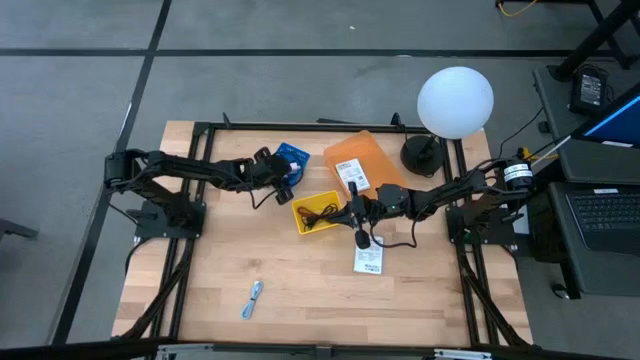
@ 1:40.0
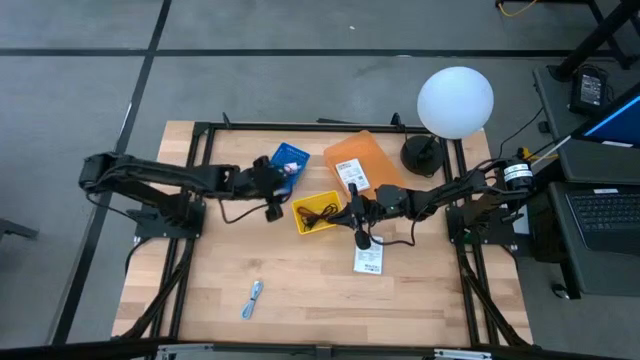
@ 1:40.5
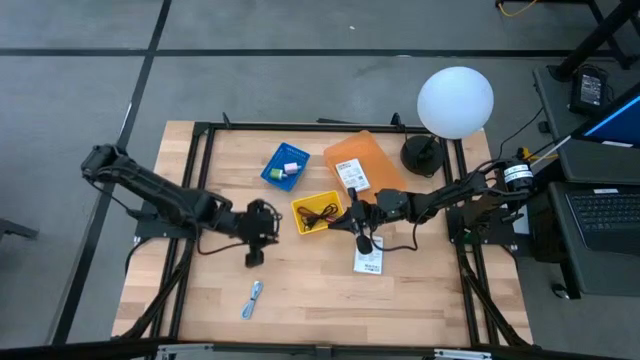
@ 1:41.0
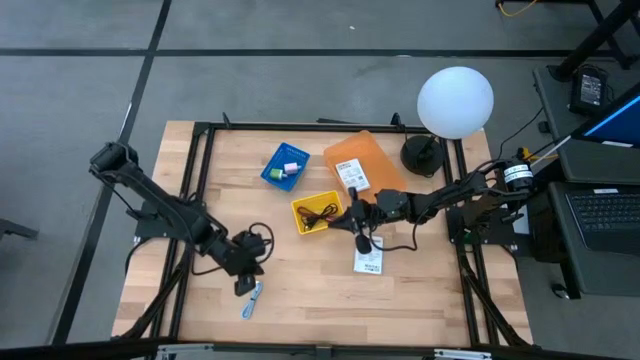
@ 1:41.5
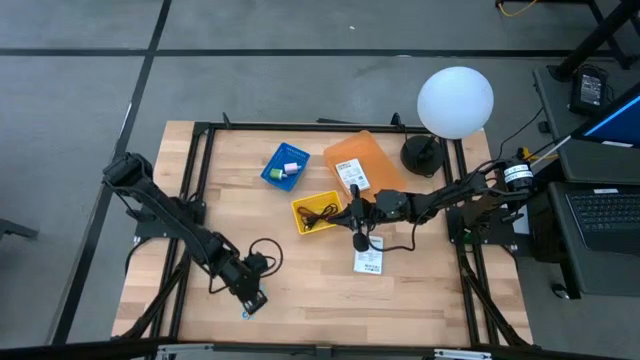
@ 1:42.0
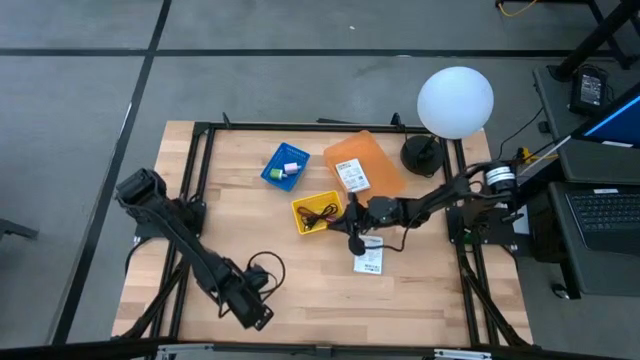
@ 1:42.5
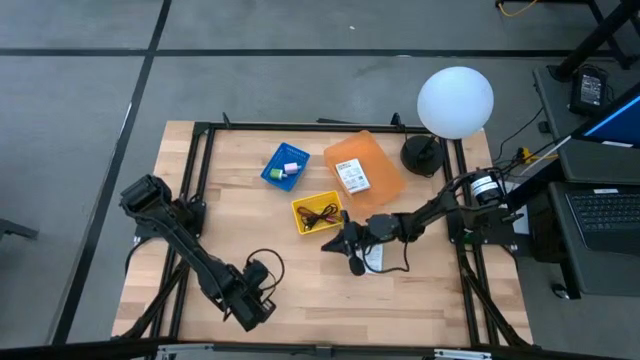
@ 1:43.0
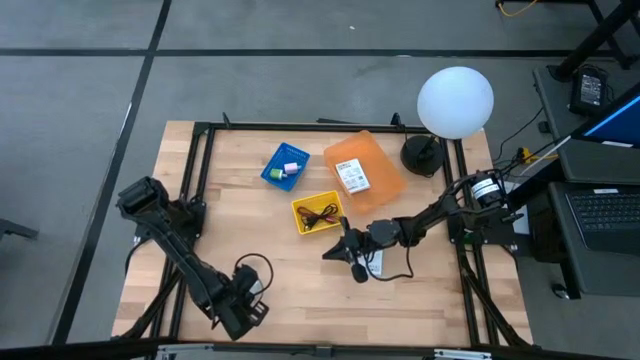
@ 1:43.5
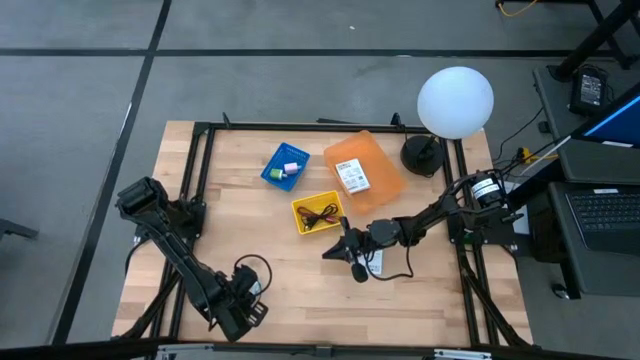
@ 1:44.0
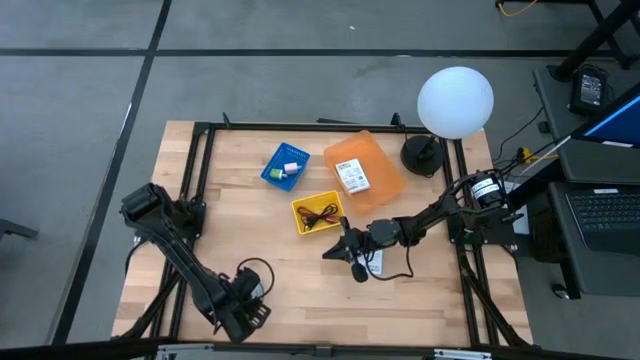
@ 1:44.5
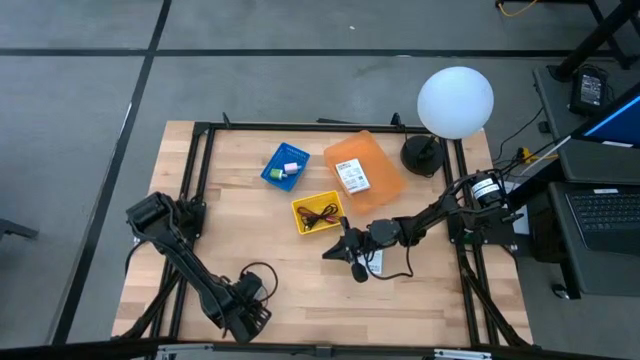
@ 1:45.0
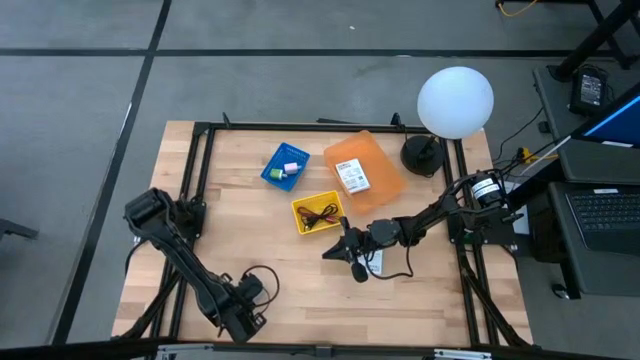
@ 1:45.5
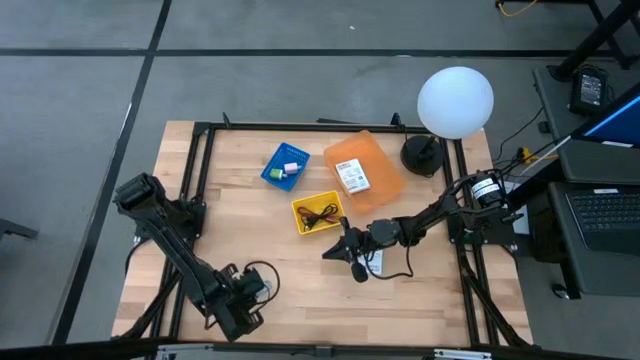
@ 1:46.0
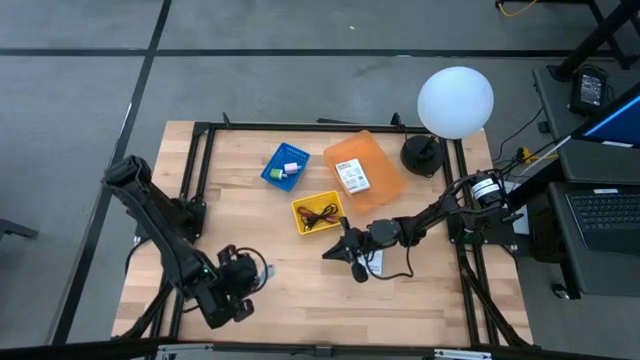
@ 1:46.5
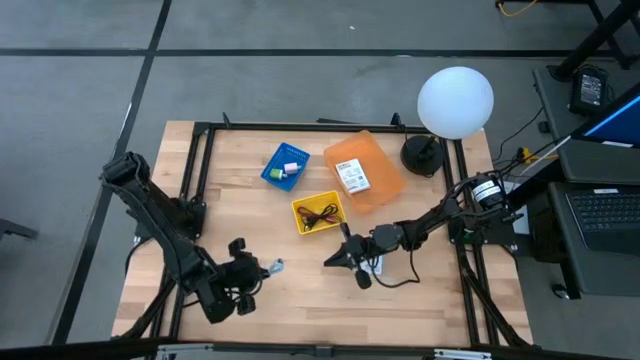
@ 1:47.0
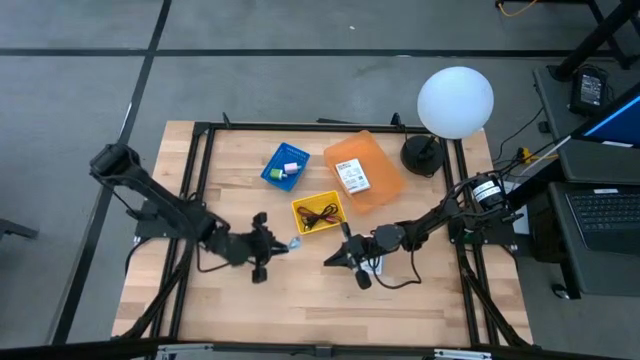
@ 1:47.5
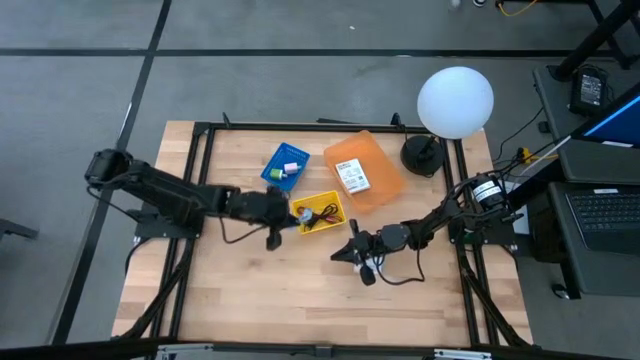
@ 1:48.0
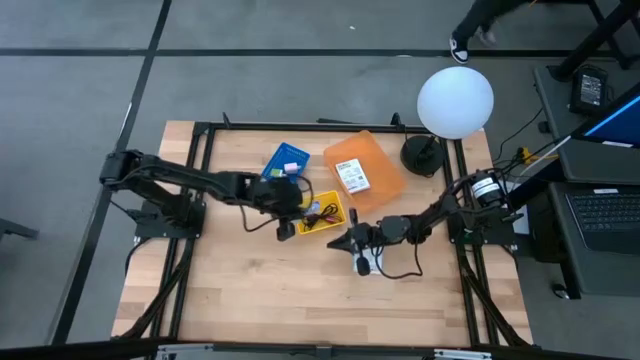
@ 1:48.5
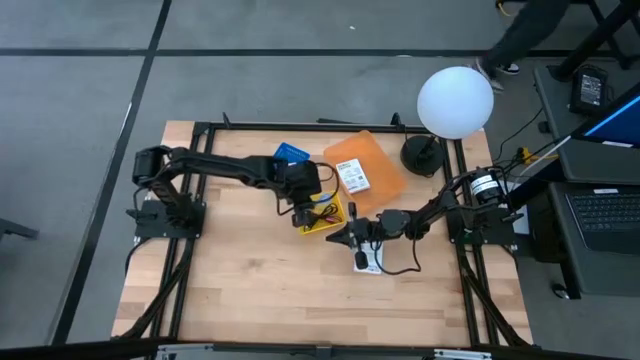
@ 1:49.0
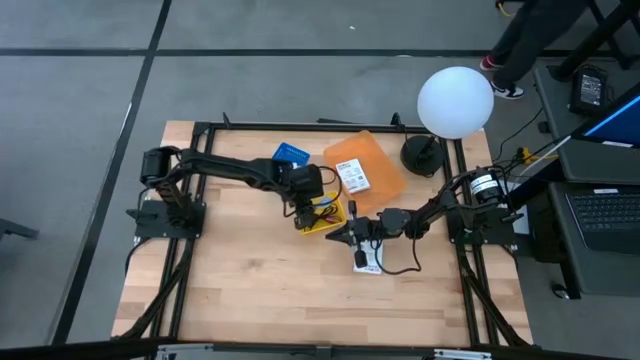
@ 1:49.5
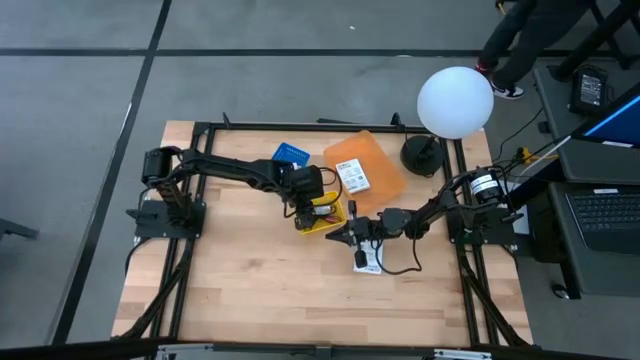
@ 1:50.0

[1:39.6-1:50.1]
Task: Pick and place items into bin
Put the light blue USB cable into the yellow bin

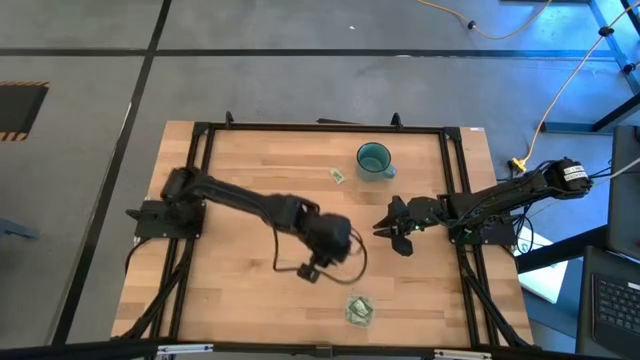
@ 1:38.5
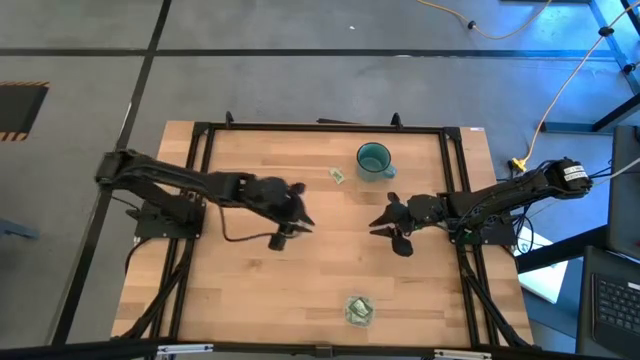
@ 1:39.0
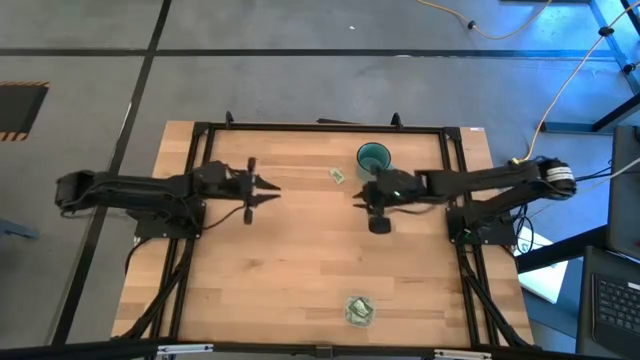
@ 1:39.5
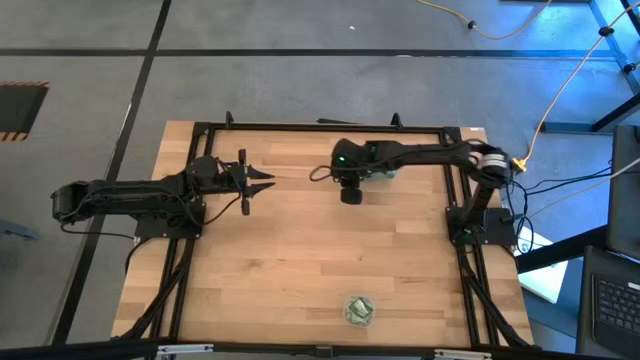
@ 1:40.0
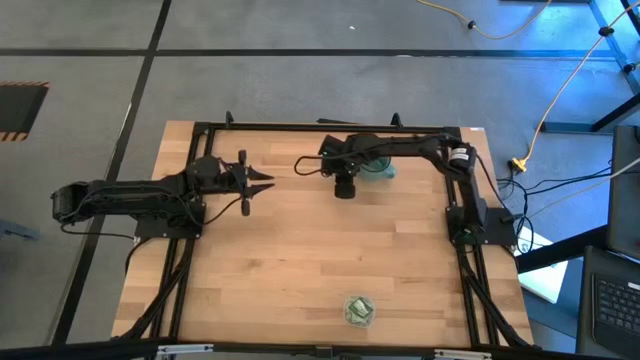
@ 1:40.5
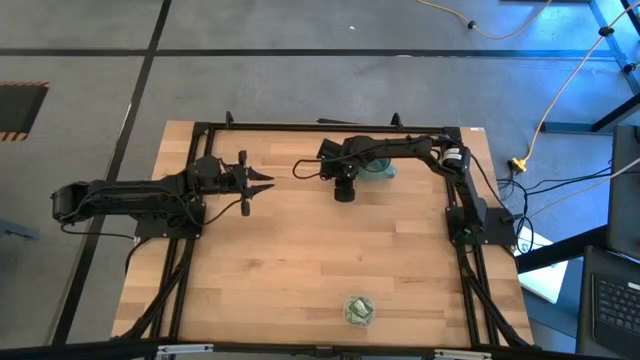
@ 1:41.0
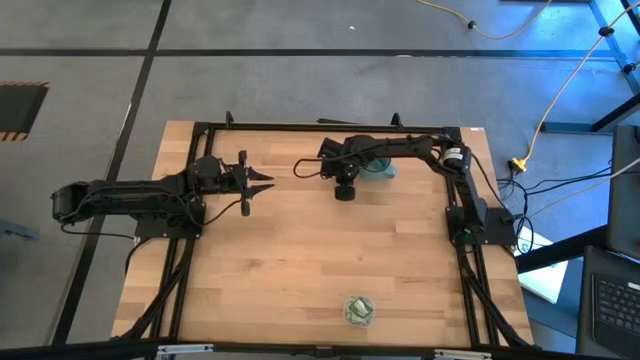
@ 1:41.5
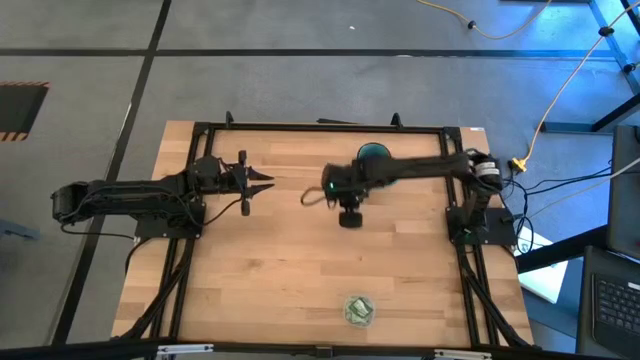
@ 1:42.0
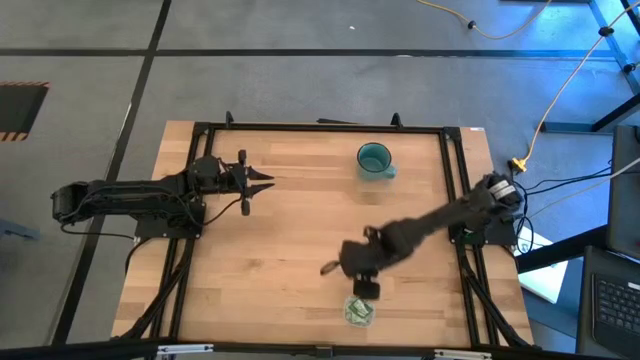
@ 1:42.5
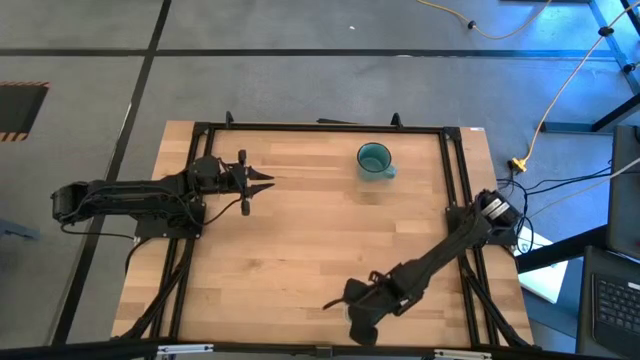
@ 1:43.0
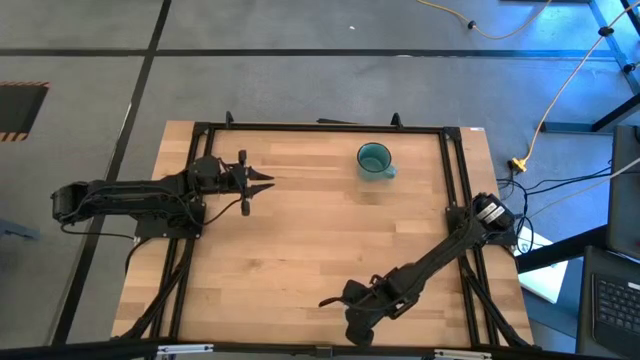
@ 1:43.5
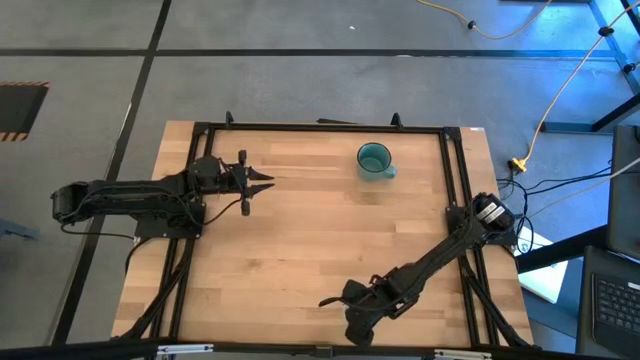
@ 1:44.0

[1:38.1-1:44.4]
Task: Pick and place items into bin
Put the light green stevia packet into the transparent bin

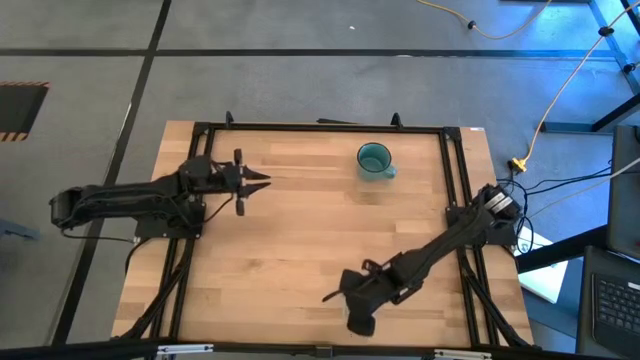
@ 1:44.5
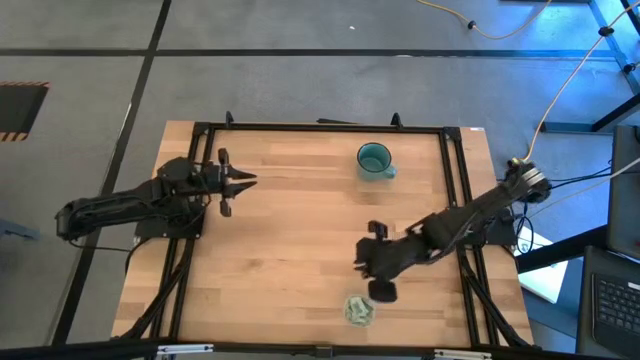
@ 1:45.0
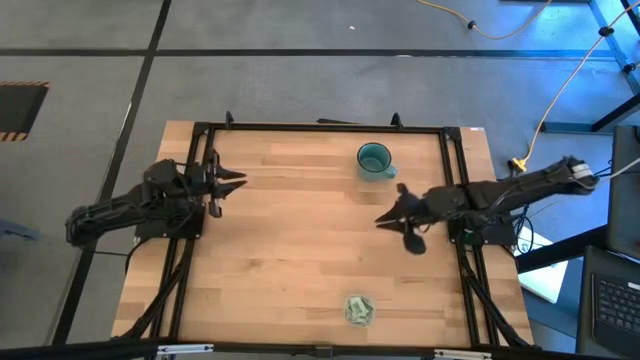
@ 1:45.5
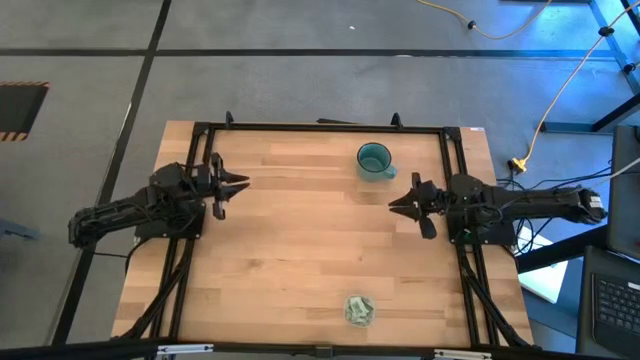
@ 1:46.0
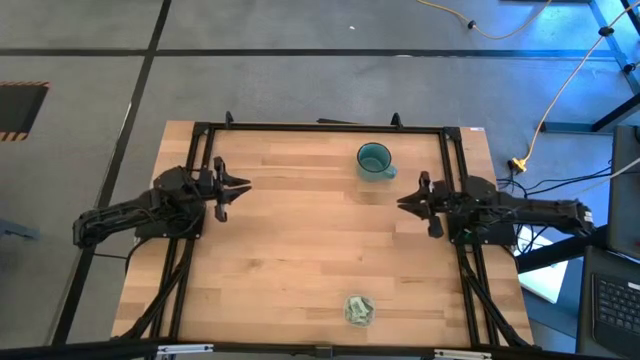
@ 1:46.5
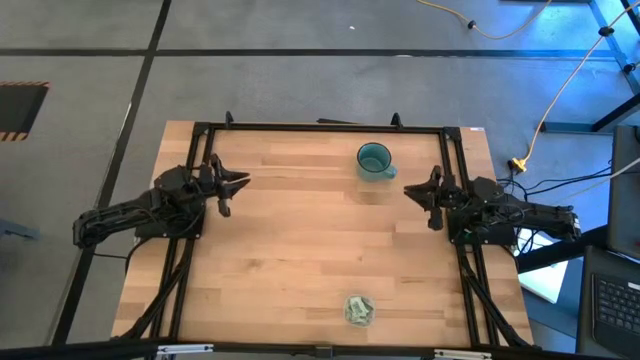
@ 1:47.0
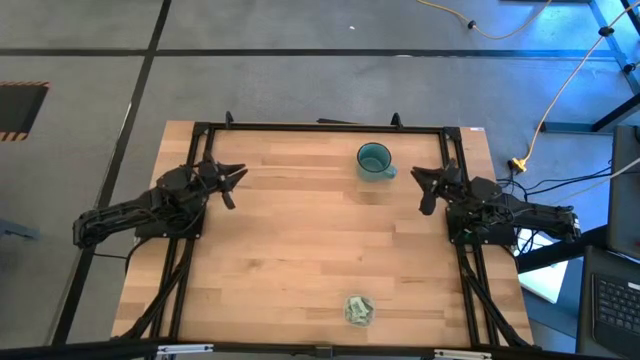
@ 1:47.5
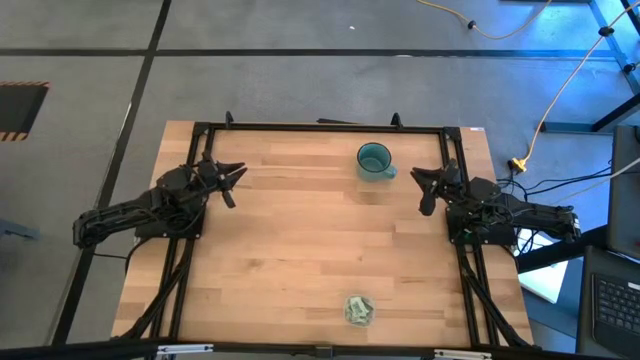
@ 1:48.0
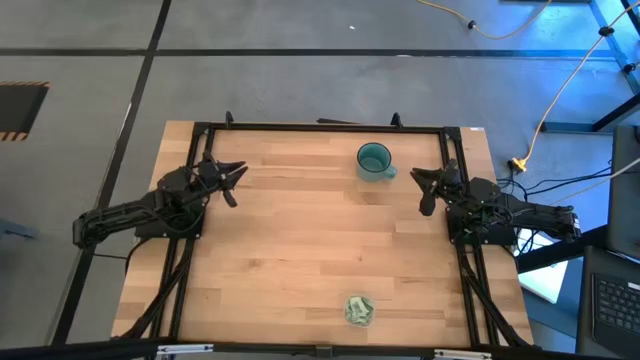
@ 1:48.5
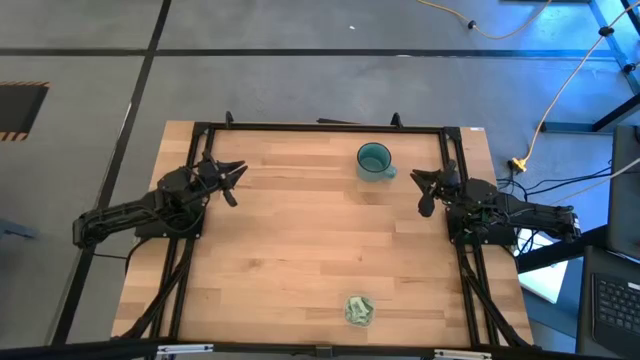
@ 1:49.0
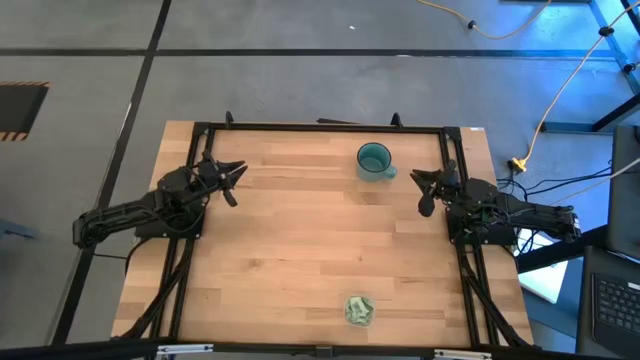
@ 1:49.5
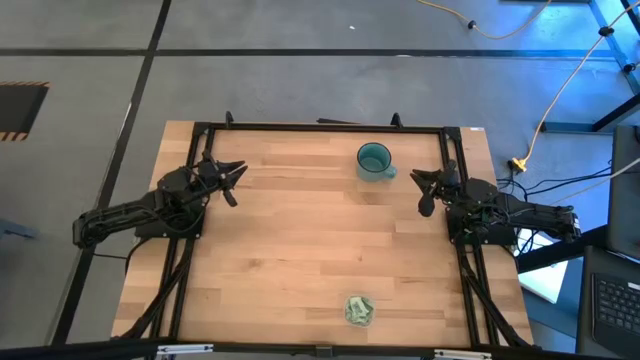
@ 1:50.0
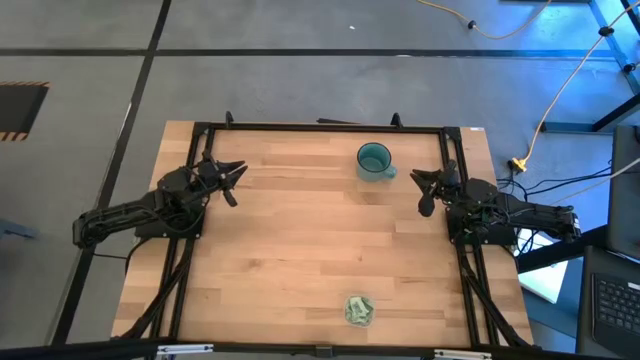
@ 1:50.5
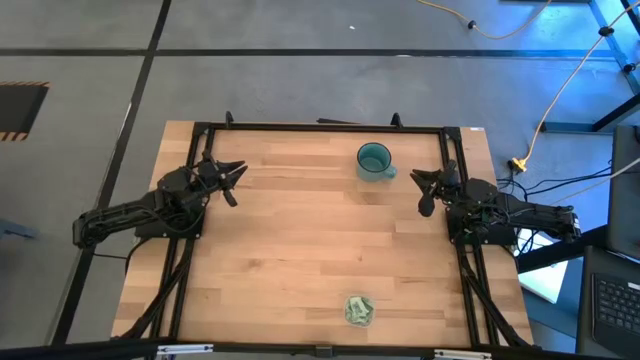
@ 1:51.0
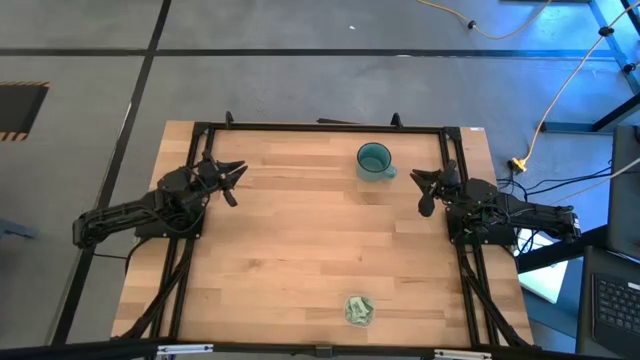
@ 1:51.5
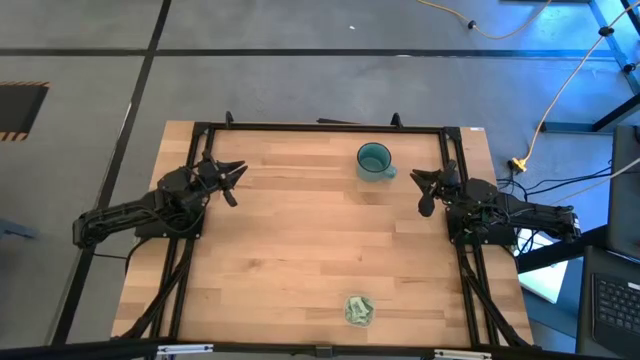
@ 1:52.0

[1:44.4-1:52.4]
Return to Home Position
